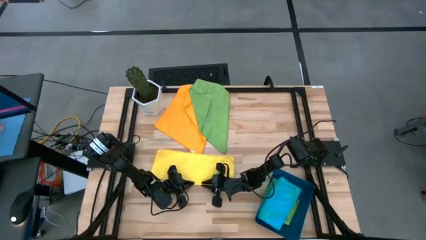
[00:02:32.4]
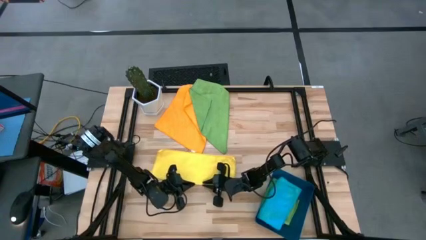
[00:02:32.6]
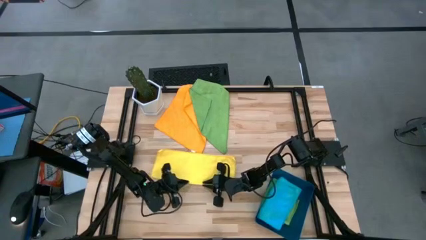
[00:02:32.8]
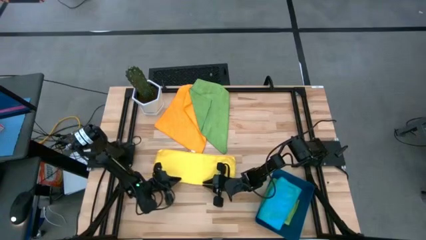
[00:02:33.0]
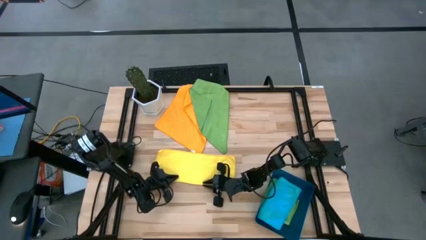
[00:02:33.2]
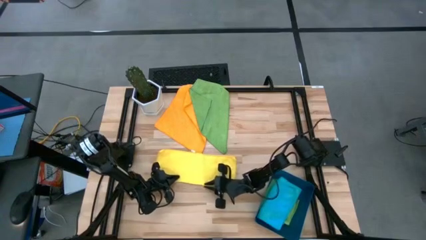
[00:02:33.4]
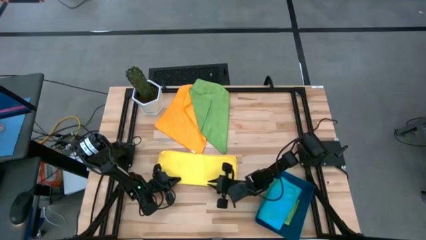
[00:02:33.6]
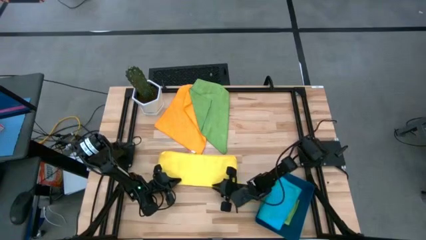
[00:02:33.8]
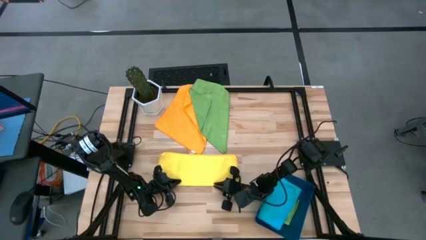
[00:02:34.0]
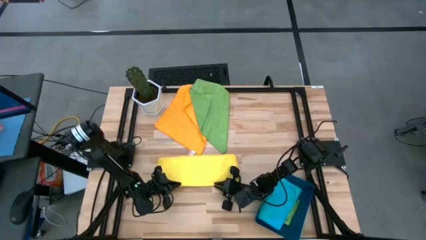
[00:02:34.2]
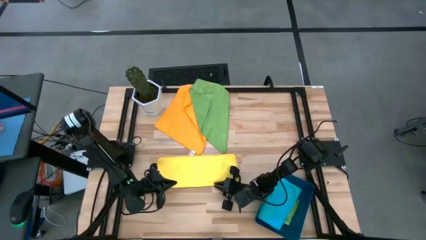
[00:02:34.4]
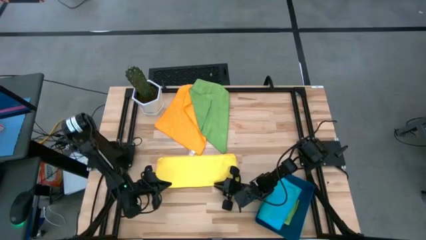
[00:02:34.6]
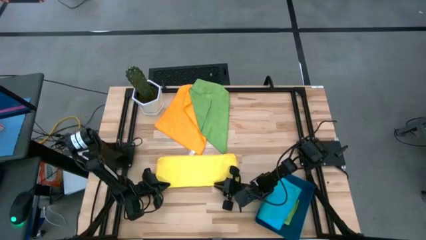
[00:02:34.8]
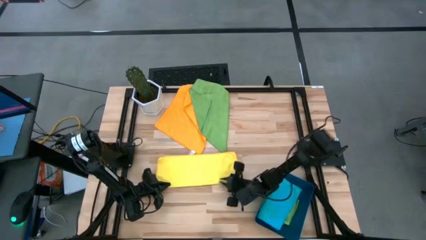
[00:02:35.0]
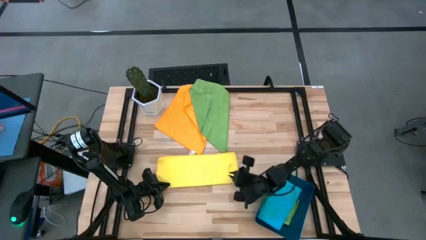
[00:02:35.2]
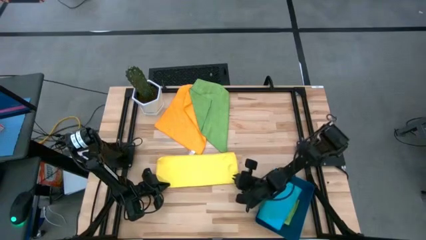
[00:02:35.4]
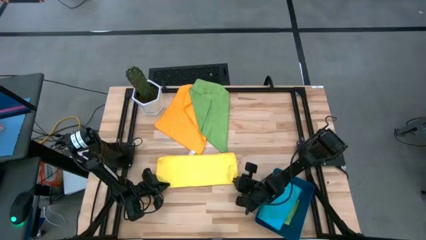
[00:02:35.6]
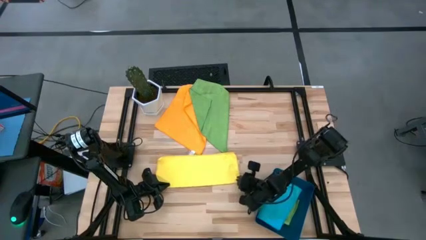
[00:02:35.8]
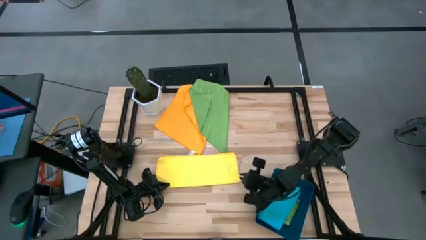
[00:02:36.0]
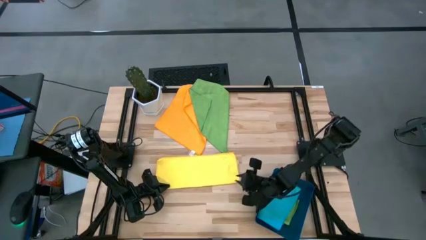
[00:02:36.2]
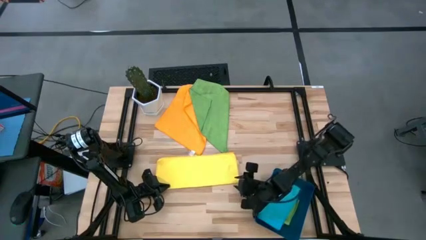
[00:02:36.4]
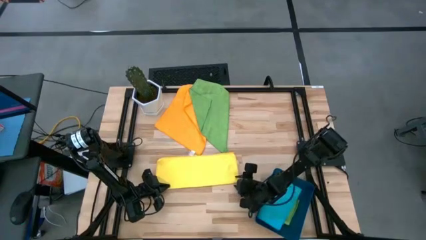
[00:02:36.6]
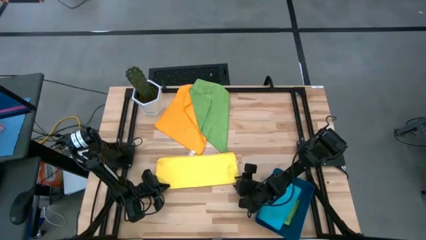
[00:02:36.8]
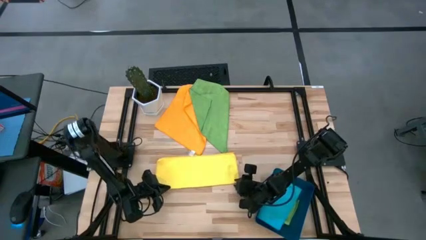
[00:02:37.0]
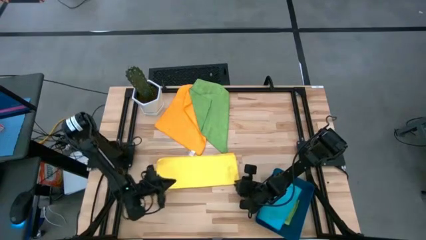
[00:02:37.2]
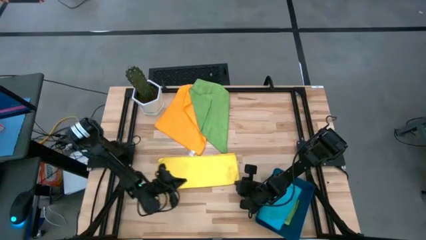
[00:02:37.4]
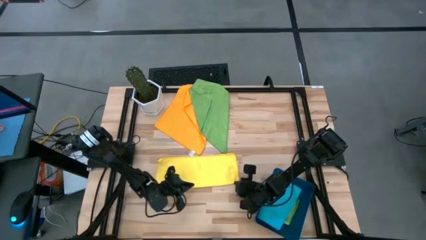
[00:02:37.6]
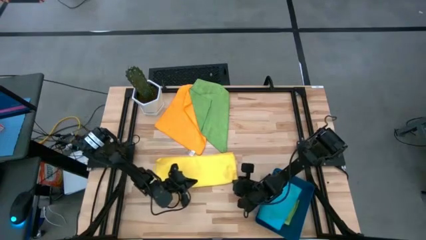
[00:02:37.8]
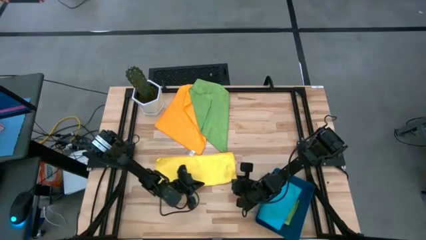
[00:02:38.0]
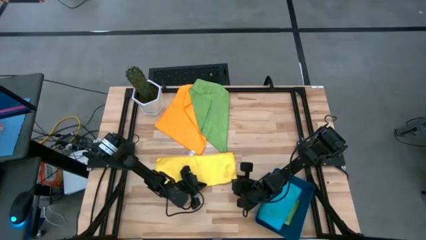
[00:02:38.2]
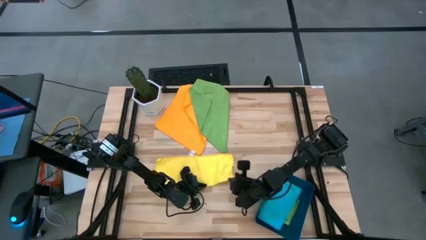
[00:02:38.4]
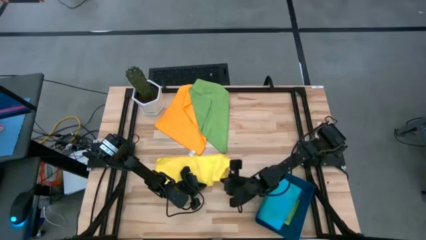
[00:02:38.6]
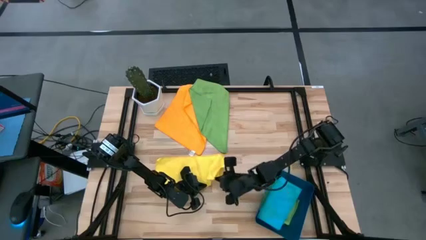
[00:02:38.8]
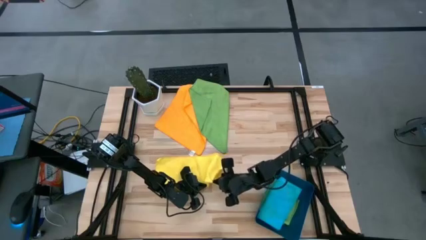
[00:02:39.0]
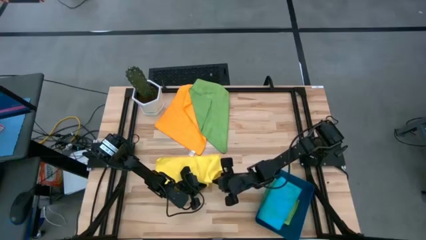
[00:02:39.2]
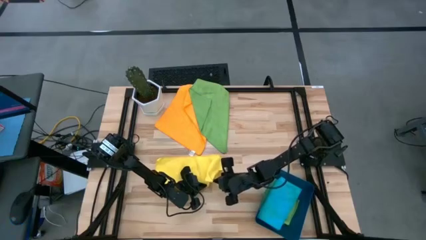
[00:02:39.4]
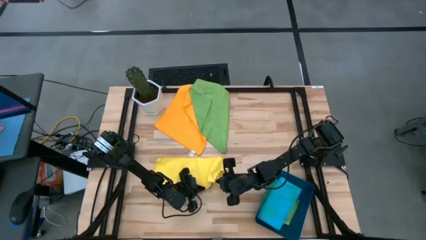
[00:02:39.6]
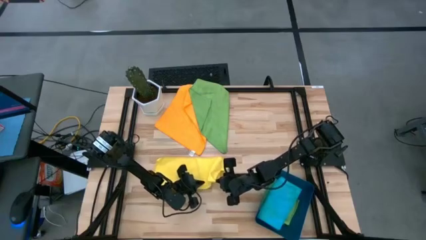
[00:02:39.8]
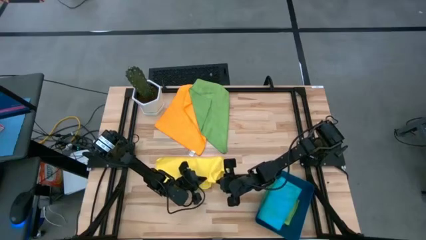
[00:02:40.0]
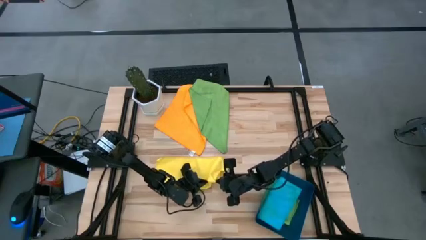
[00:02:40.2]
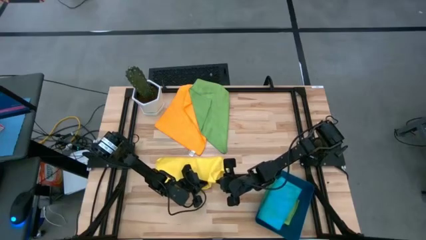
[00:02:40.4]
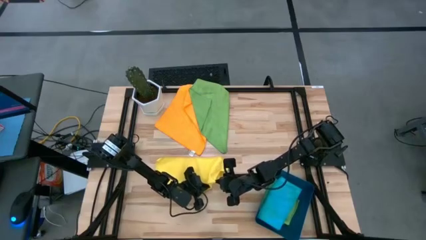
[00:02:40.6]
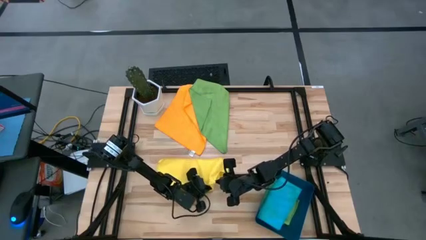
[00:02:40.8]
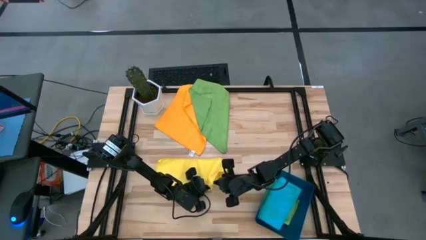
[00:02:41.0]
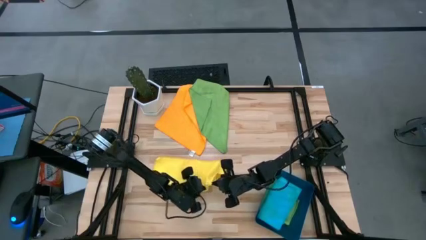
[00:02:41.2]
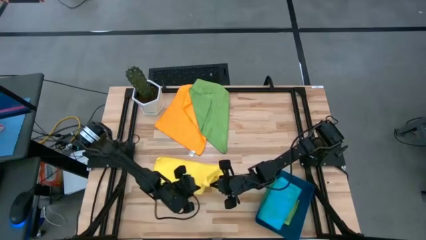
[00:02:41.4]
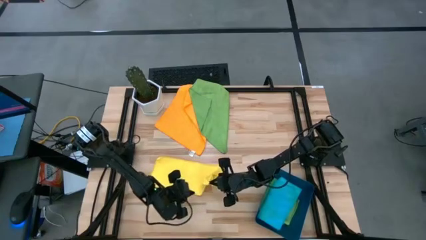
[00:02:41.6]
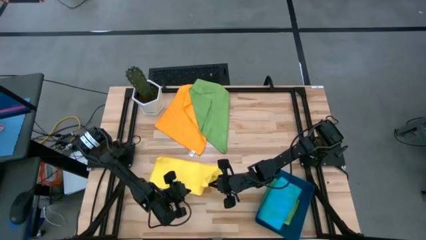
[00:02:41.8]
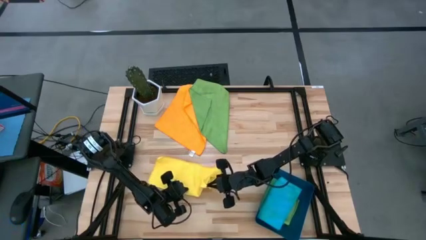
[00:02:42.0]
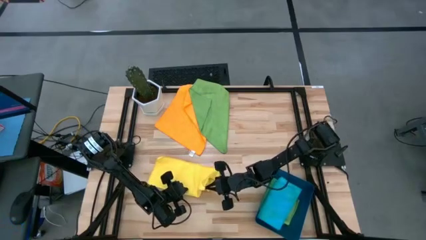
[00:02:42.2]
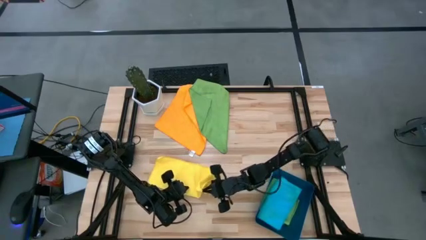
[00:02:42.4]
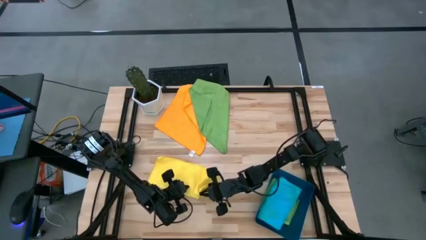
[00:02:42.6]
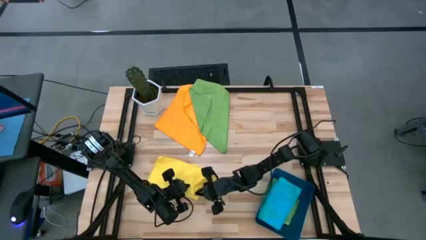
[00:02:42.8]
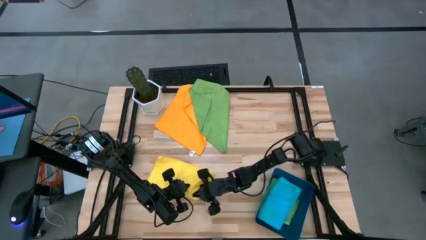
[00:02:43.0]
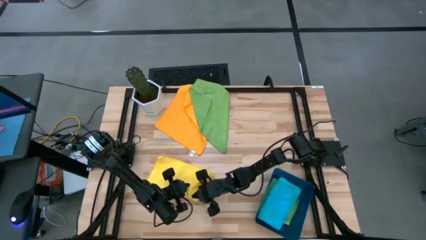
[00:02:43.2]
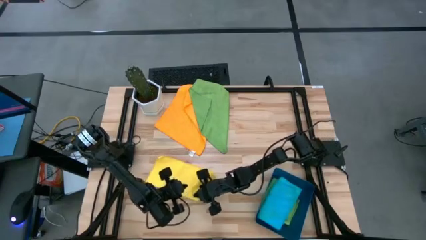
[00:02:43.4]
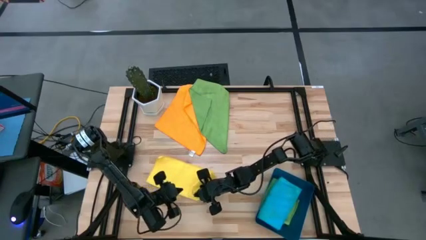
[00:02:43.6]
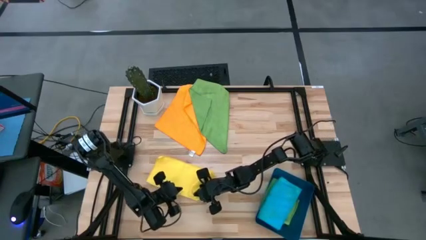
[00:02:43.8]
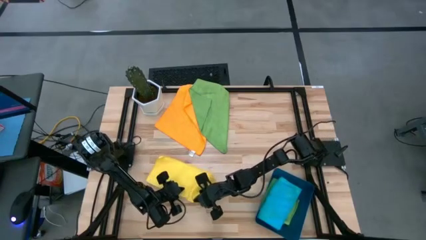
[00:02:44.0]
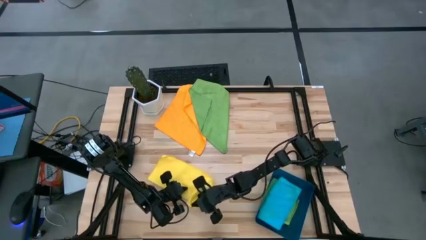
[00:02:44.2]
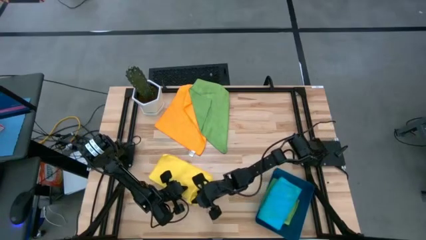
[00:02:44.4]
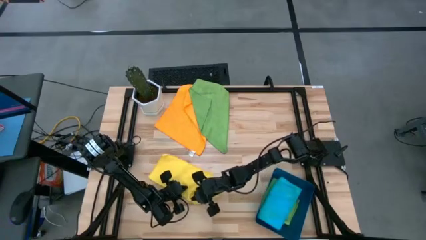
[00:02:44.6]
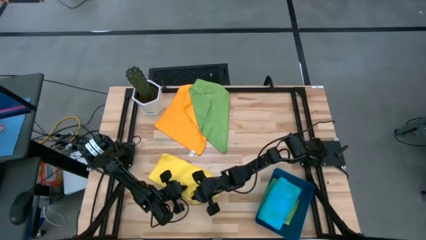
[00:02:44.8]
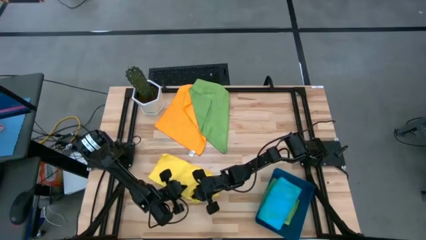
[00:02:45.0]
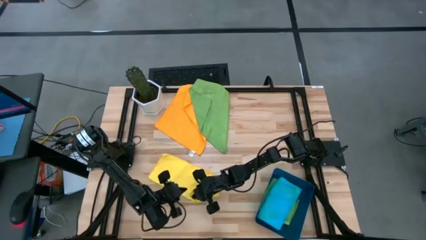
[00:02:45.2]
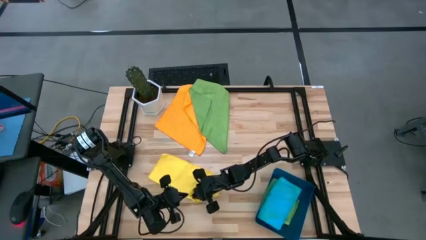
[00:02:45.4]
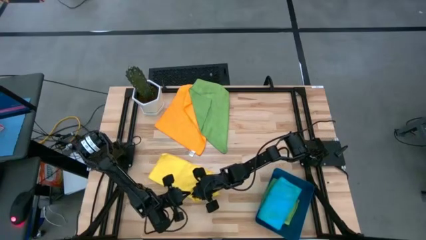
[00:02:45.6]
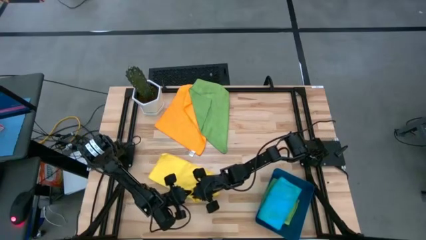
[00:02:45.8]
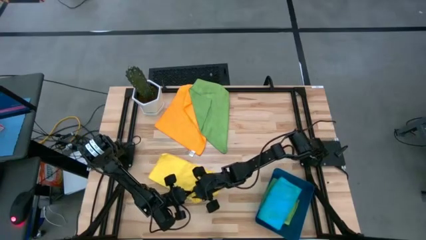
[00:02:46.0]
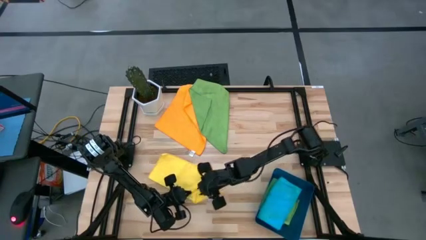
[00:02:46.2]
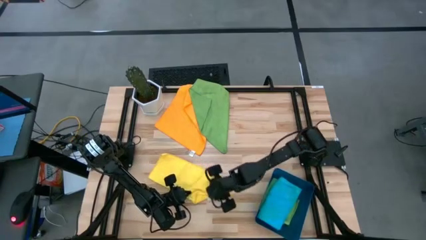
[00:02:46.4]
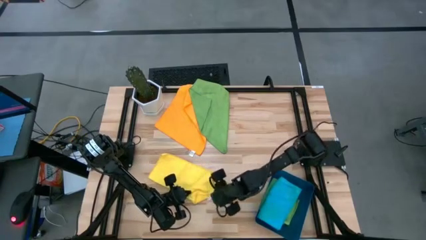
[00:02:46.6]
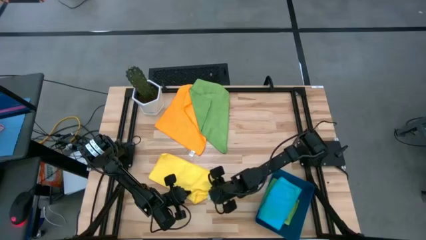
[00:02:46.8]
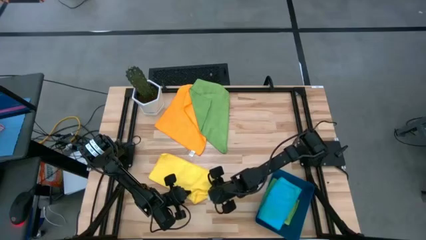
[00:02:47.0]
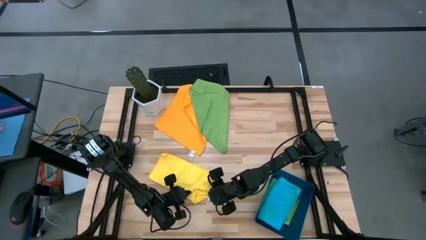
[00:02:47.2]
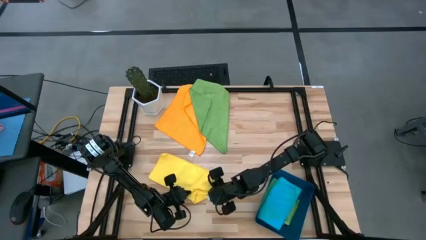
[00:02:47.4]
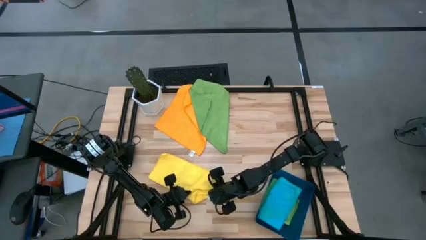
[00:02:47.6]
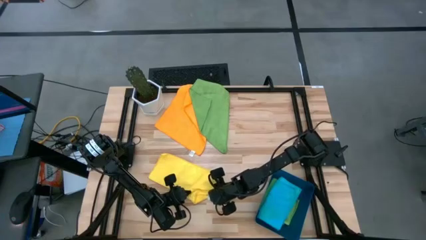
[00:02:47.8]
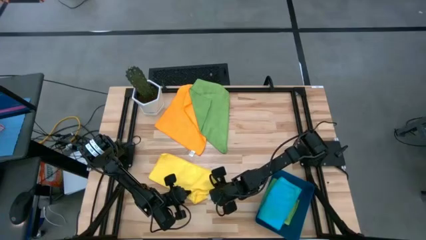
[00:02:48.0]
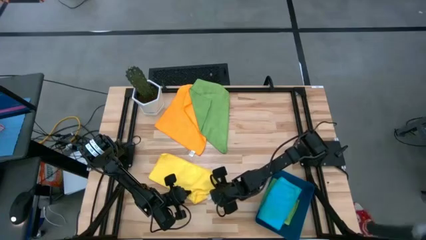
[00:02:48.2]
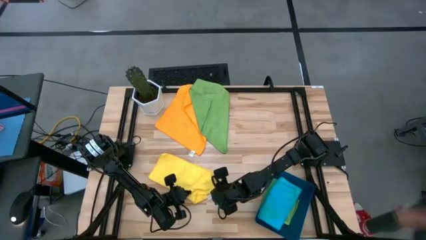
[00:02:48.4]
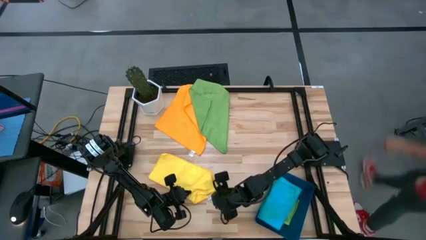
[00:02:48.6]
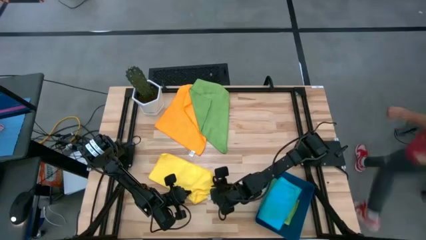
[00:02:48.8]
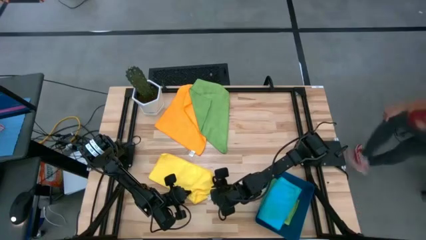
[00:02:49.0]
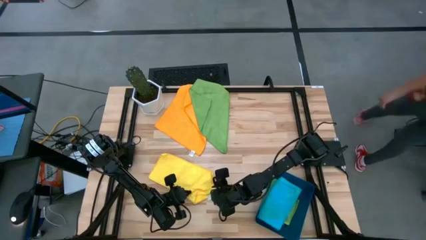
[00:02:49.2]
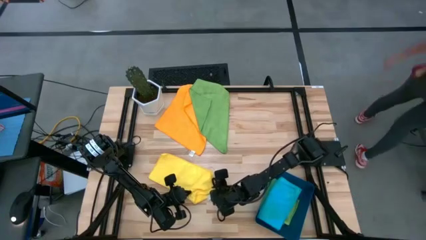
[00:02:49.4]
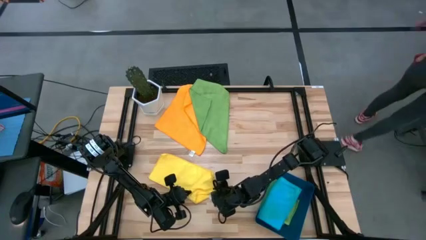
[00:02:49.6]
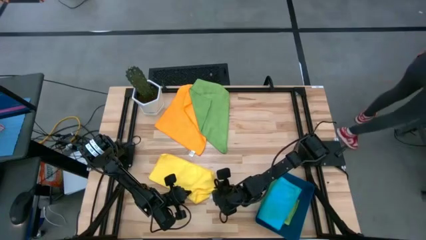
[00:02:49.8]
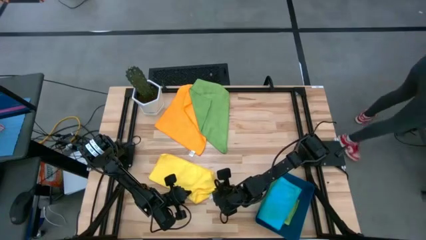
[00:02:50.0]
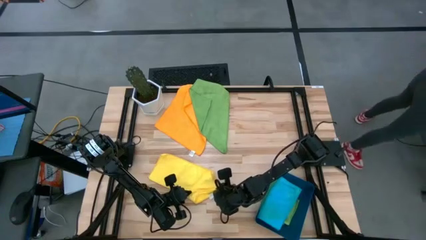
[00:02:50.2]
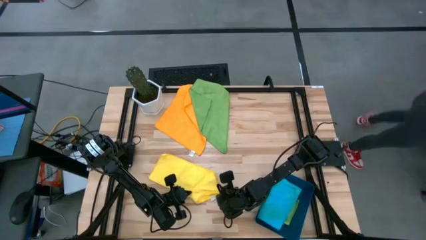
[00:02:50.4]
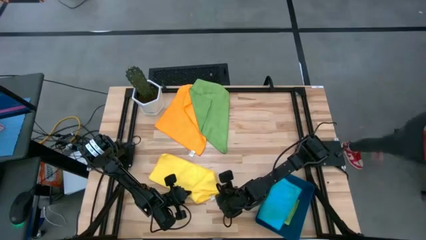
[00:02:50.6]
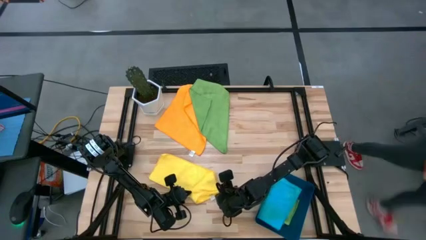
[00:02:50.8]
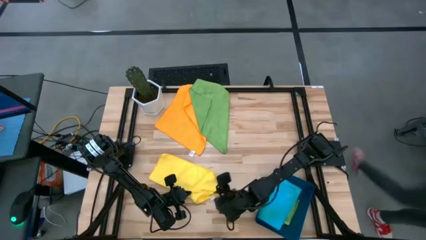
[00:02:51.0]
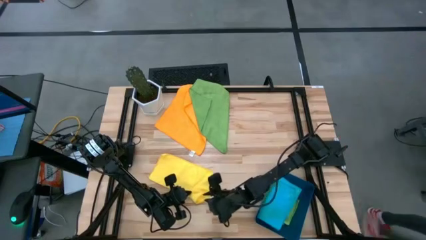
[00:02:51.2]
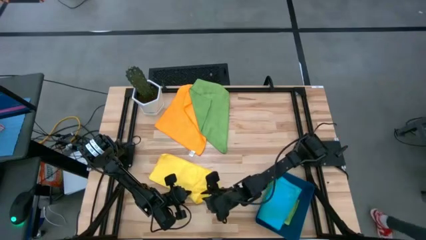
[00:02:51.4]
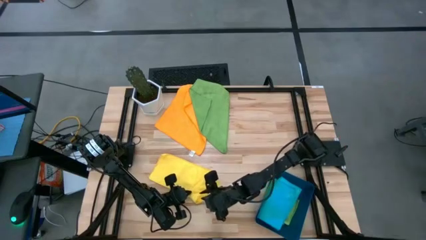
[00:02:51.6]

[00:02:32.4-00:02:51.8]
Task: Fold microfiber towels
Fold the yellow microfiber towel
